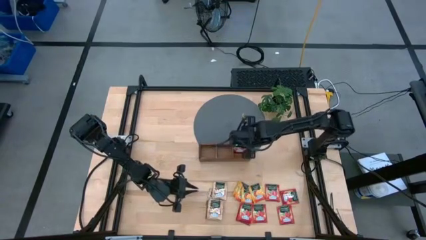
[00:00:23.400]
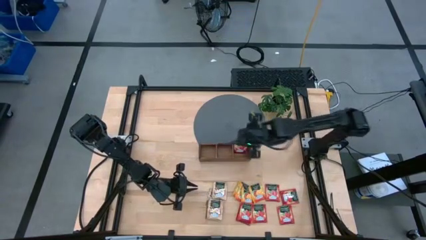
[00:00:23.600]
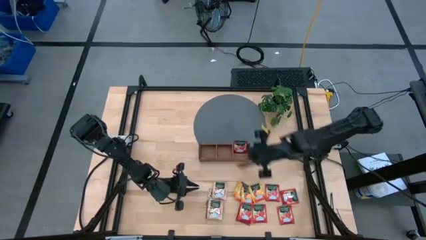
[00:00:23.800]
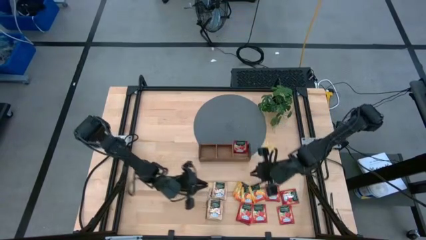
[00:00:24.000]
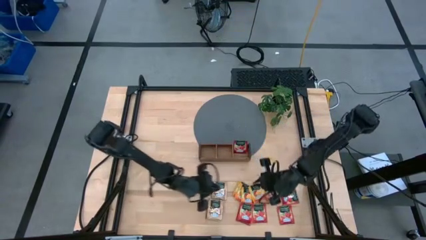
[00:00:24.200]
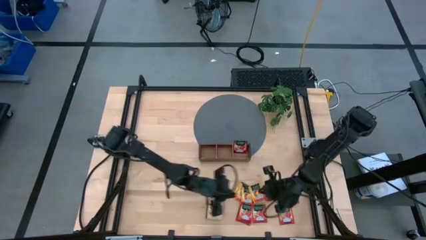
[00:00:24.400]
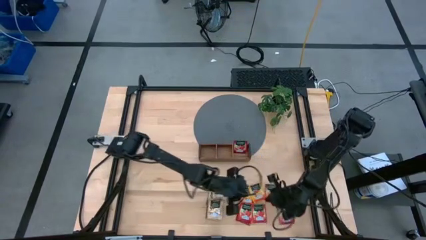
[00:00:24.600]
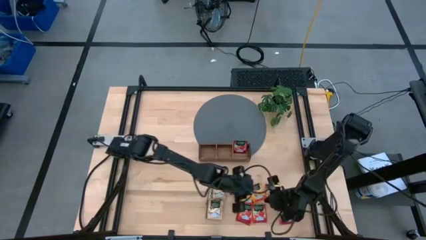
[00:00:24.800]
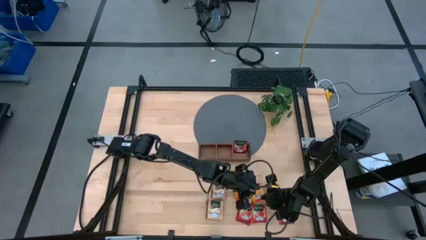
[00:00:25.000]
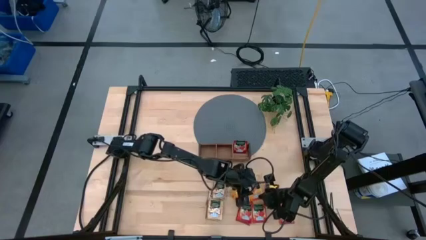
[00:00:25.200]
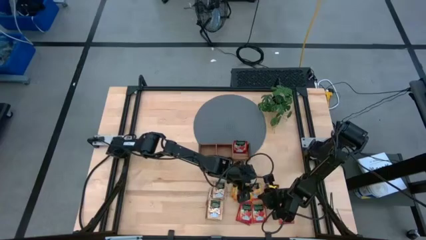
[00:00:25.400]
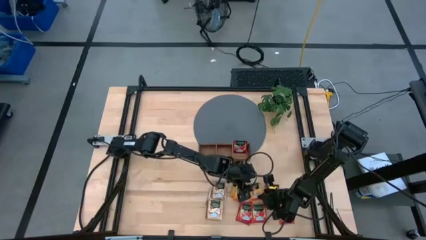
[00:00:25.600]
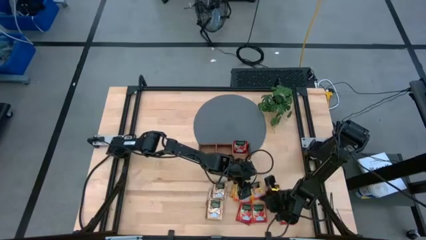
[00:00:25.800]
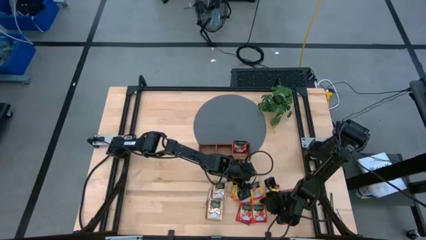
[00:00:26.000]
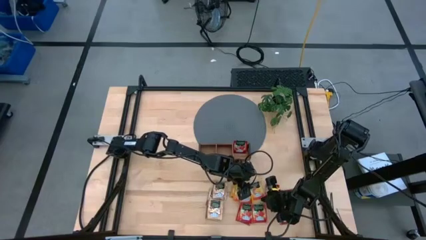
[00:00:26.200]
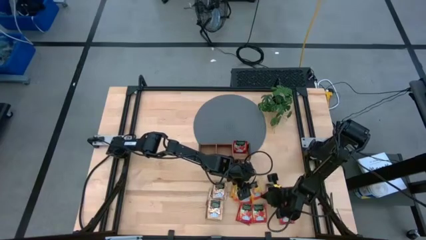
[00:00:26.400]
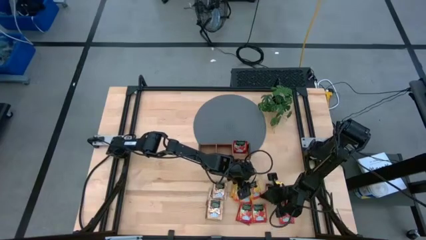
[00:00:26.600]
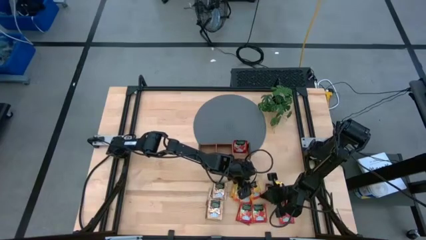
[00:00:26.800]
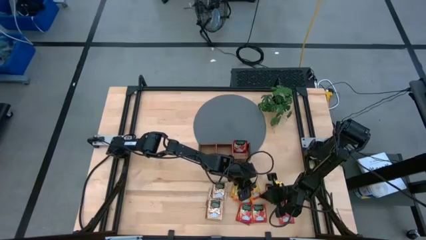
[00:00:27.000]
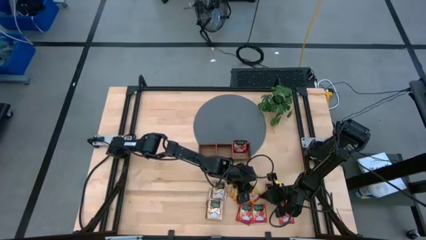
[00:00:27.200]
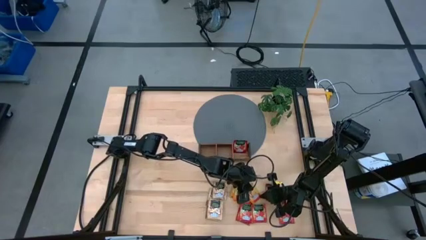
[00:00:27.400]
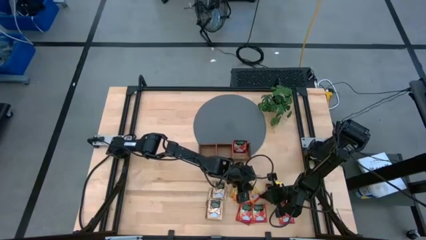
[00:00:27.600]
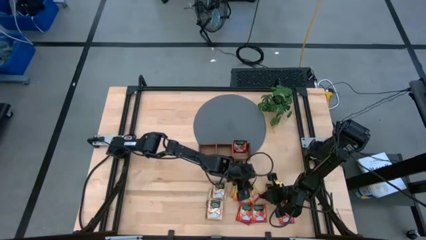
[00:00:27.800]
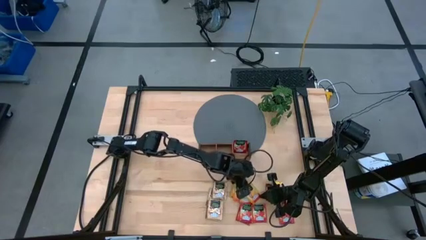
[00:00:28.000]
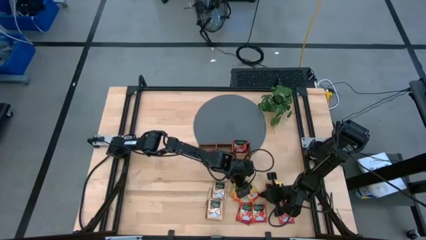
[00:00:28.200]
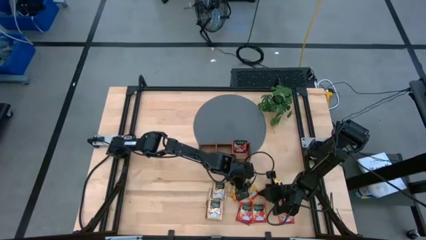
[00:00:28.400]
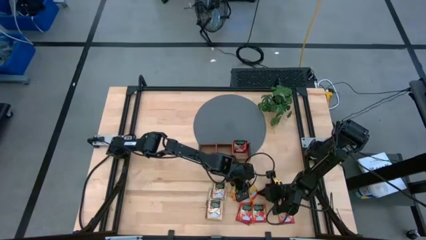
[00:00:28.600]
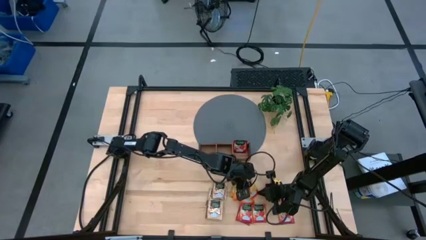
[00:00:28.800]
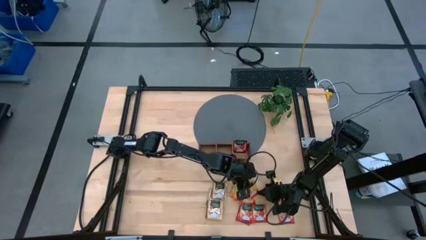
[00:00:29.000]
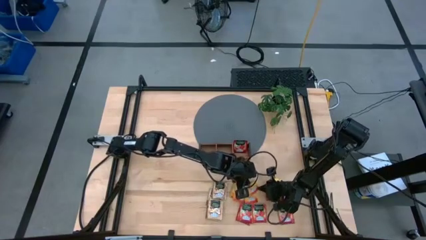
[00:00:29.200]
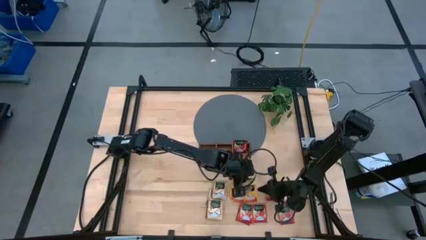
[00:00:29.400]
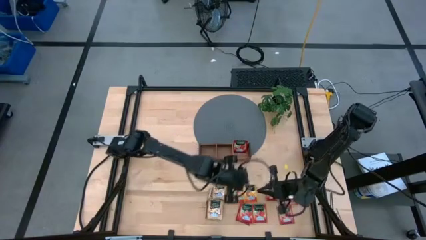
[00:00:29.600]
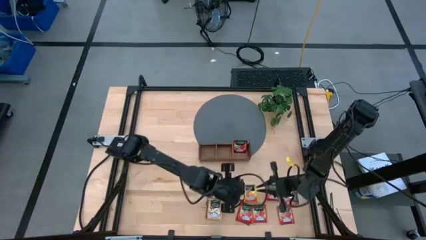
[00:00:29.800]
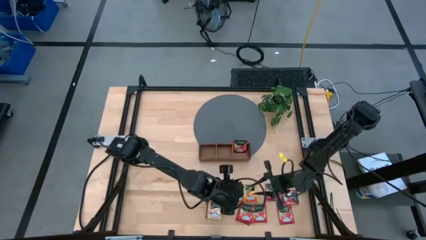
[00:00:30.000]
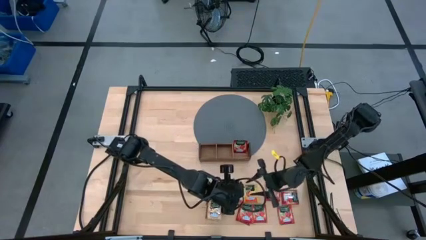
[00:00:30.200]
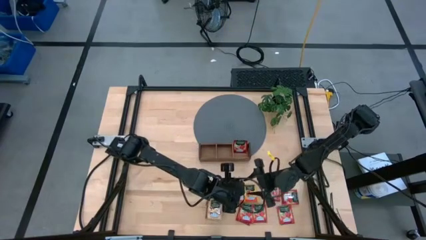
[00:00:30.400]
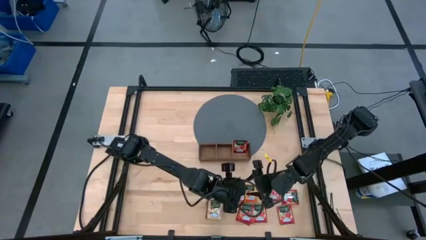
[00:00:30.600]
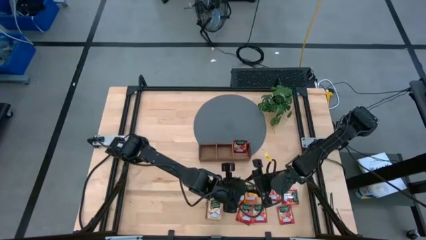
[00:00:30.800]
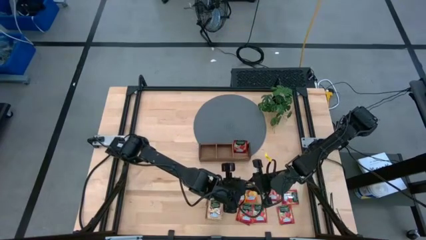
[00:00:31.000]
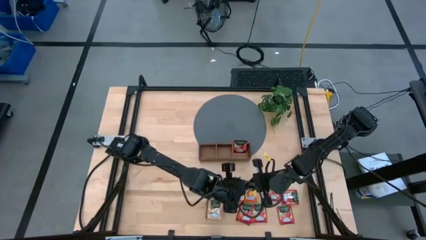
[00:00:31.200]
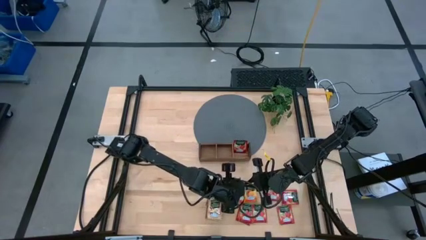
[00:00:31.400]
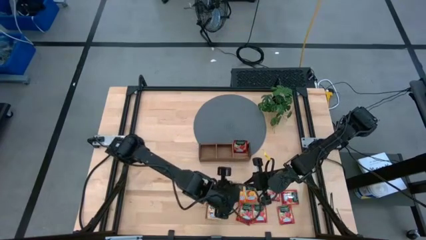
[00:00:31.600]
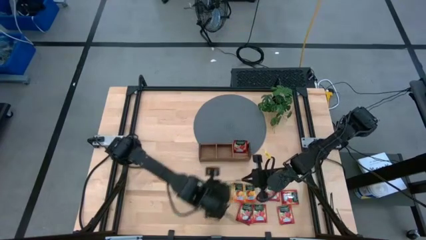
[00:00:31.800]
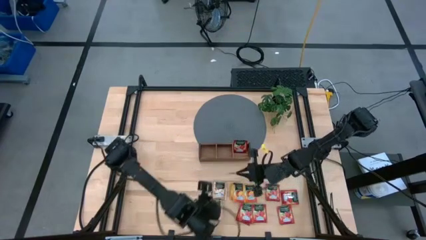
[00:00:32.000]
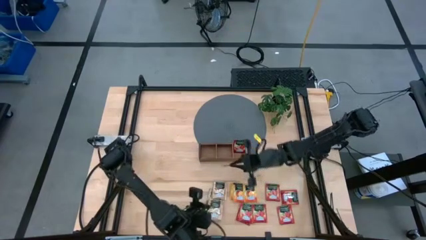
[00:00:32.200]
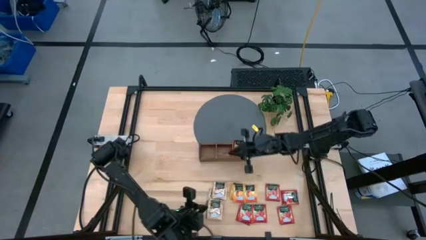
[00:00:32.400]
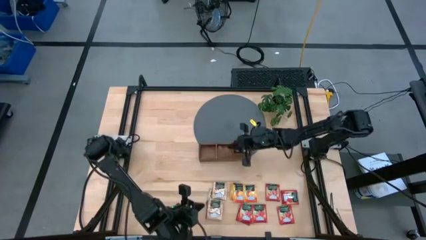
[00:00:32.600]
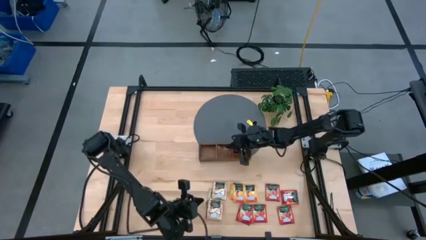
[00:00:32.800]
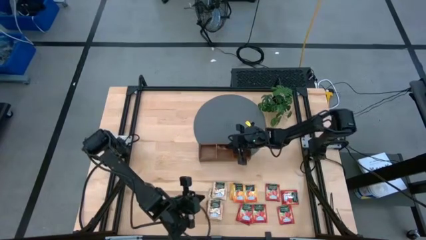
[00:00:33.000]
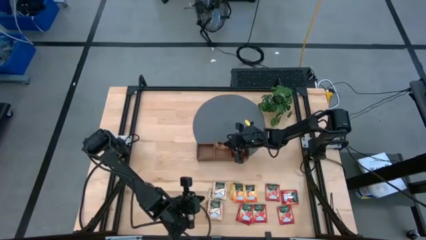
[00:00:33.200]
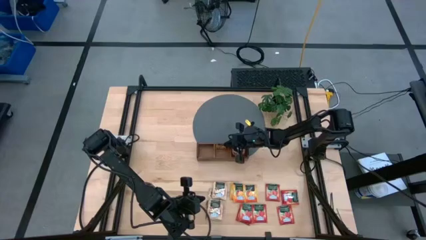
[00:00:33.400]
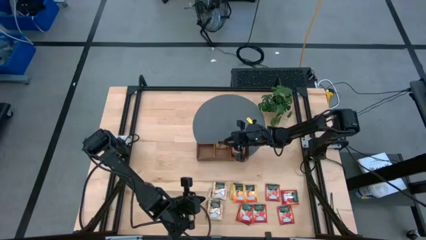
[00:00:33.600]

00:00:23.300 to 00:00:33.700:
Task: Pick & Place Tea
Put the yellow tea bag into the middle wooden organizer

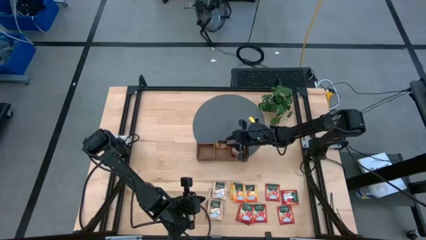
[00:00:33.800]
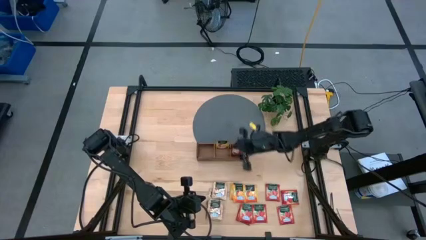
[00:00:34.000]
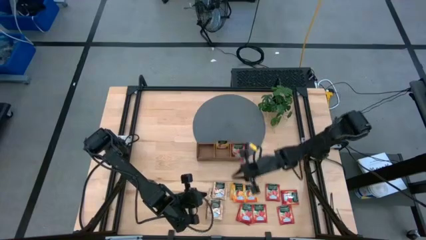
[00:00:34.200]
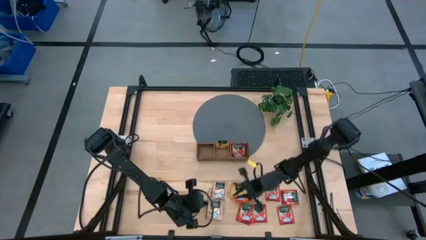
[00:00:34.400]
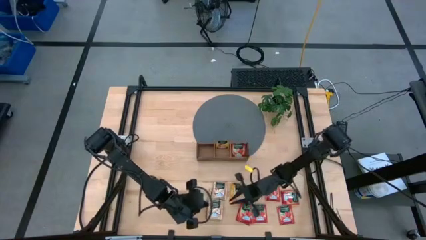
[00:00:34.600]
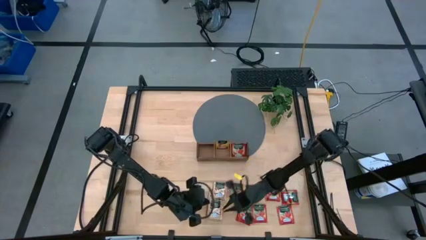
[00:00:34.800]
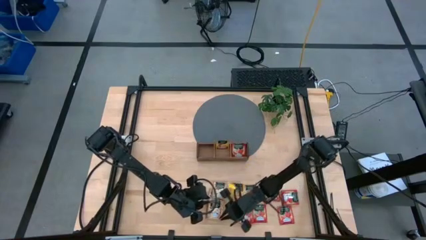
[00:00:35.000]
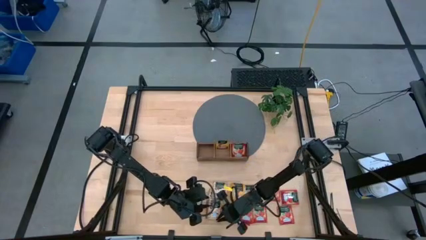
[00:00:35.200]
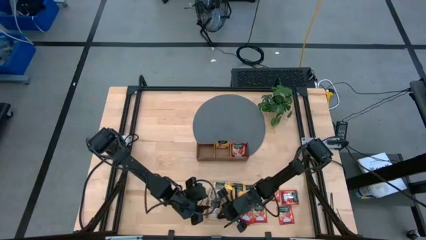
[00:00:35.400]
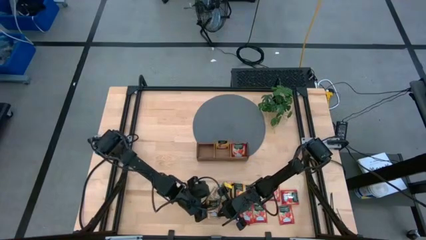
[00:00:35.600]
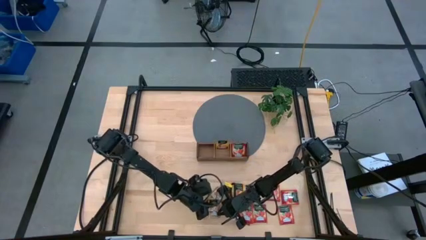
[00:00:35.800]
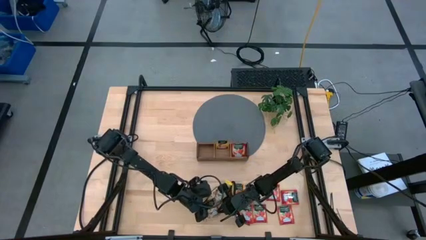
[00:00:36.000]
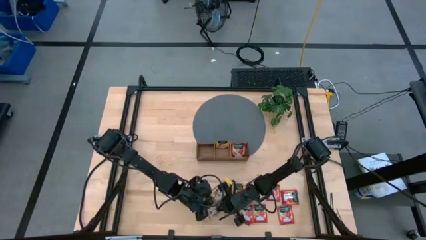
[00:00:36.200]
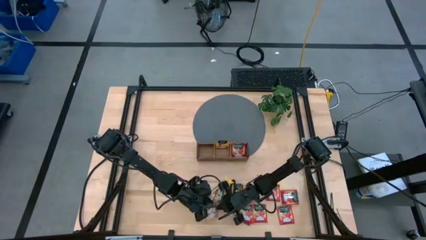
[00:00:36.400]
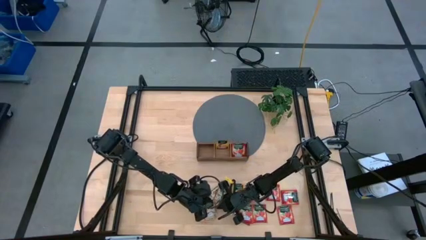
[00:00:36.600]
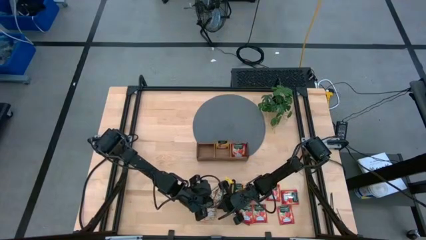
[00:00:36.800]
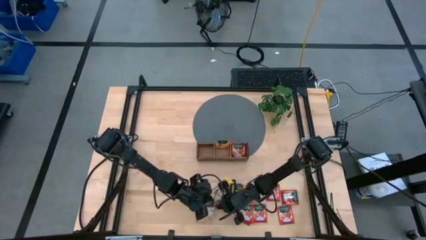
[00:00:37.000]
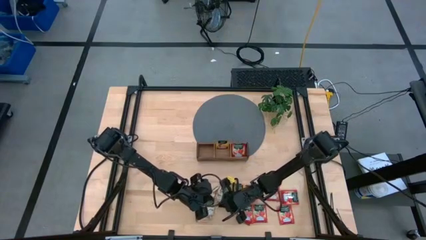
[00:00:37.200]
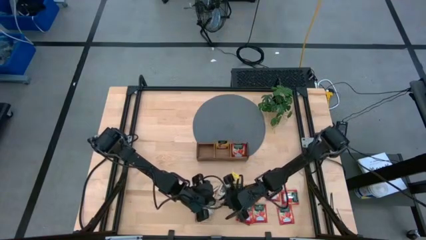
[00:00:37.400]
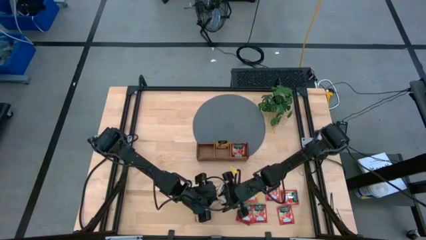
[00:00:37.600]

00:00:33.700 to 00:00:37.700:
Put the brown tea bag into the left wooden organizer
